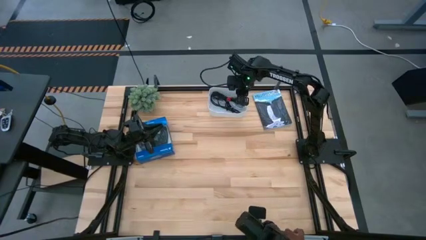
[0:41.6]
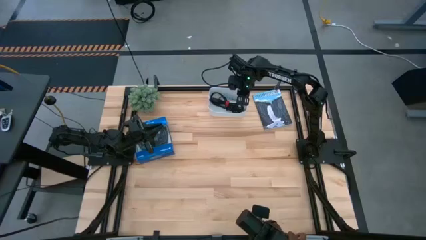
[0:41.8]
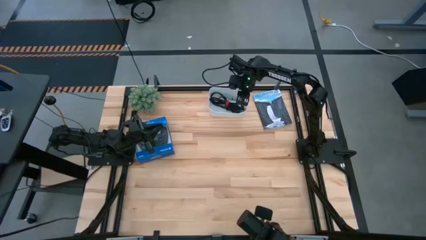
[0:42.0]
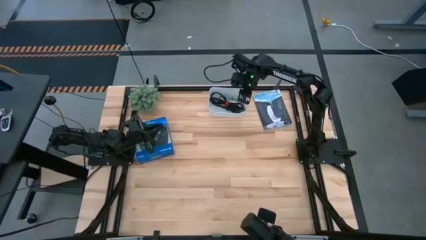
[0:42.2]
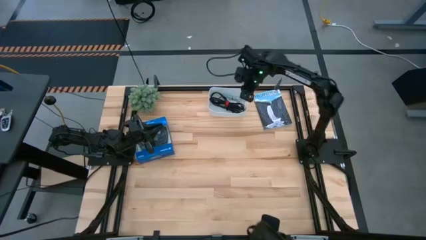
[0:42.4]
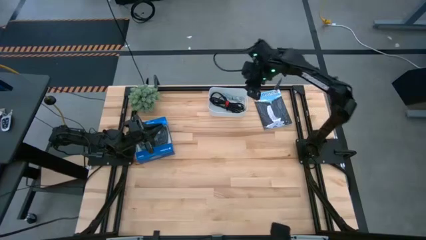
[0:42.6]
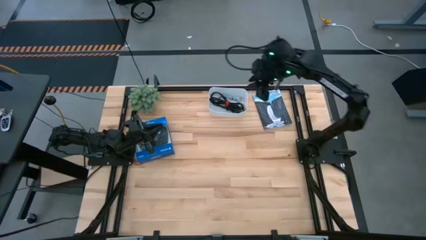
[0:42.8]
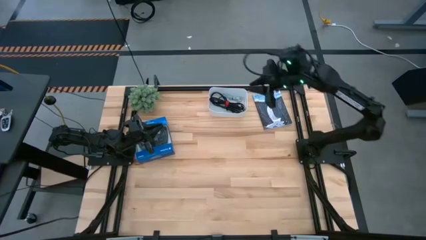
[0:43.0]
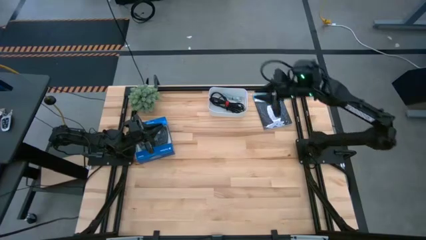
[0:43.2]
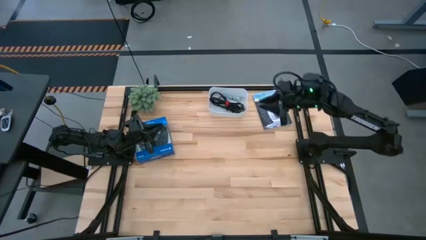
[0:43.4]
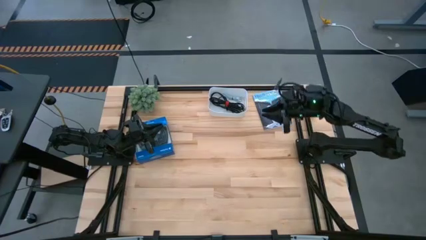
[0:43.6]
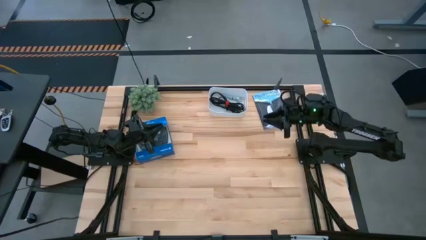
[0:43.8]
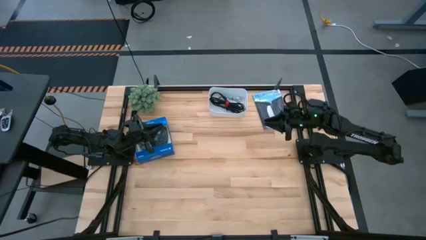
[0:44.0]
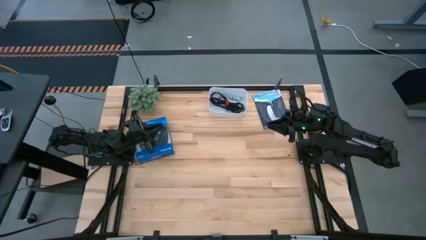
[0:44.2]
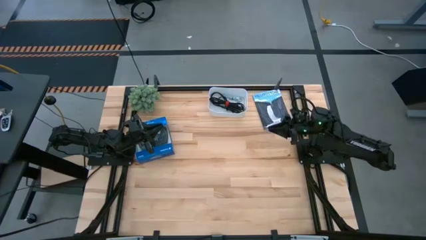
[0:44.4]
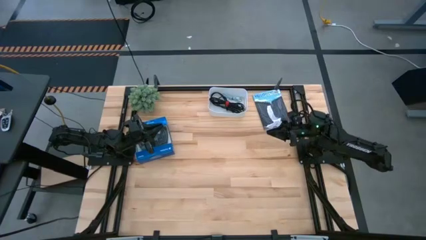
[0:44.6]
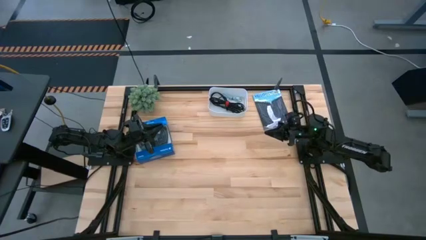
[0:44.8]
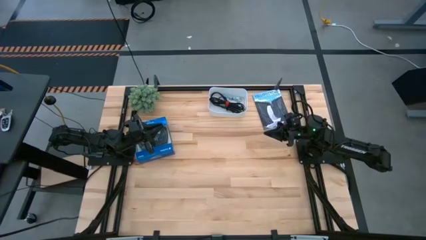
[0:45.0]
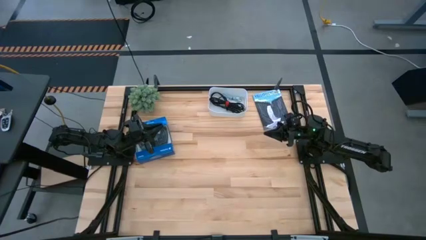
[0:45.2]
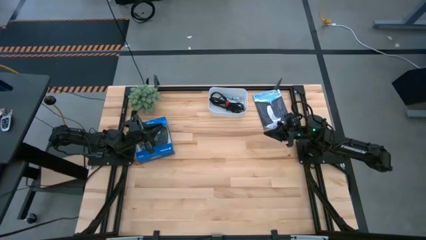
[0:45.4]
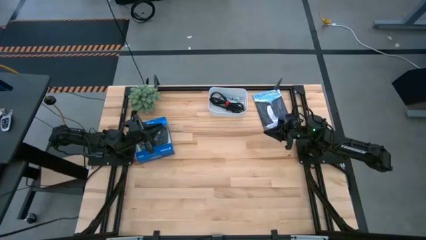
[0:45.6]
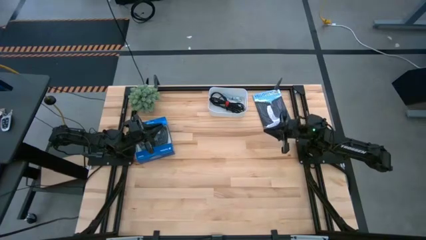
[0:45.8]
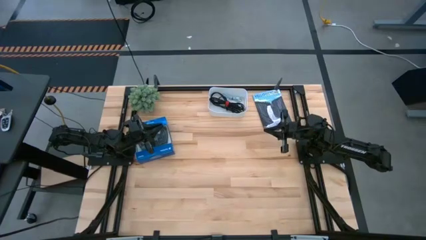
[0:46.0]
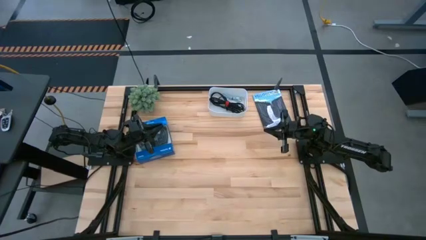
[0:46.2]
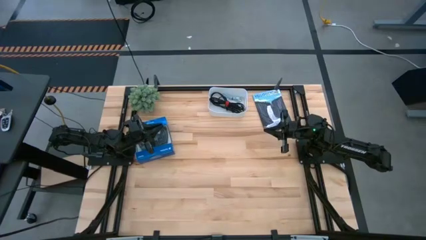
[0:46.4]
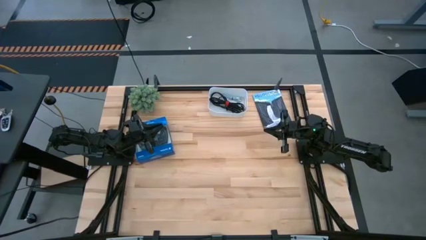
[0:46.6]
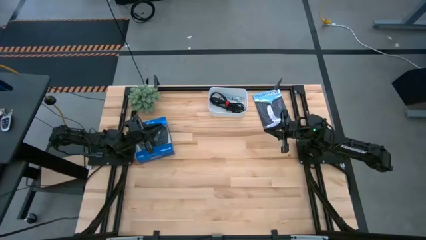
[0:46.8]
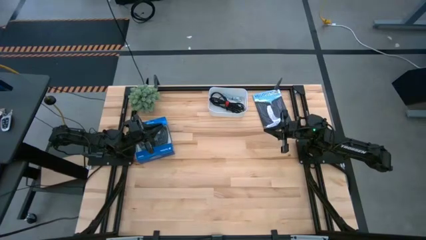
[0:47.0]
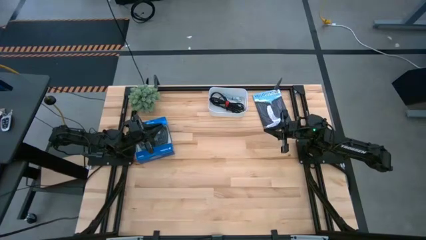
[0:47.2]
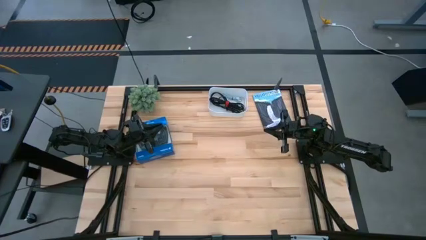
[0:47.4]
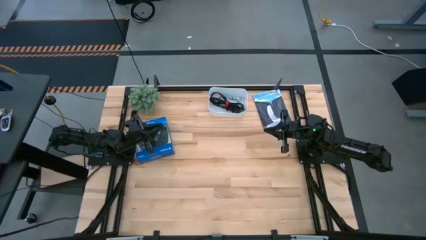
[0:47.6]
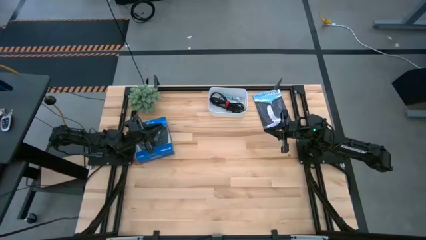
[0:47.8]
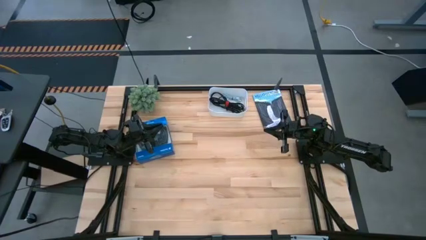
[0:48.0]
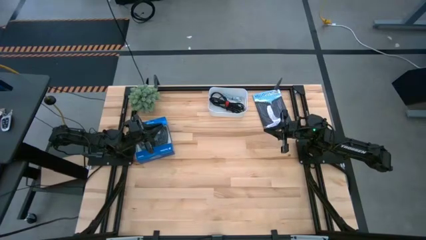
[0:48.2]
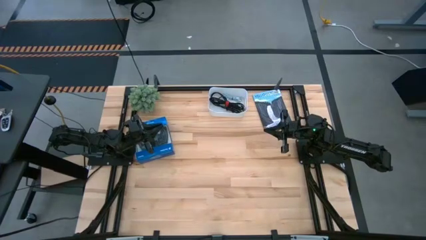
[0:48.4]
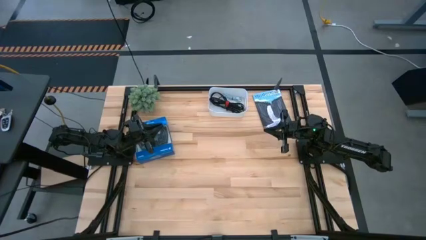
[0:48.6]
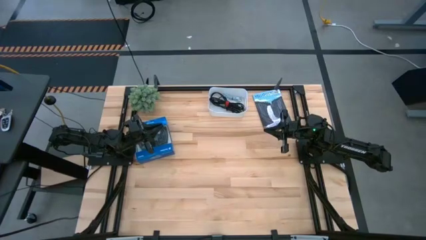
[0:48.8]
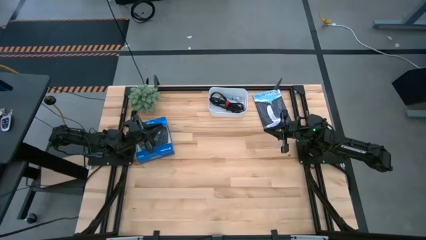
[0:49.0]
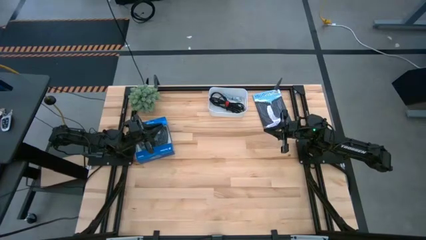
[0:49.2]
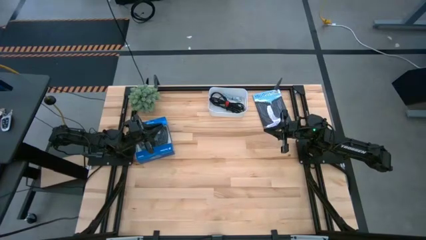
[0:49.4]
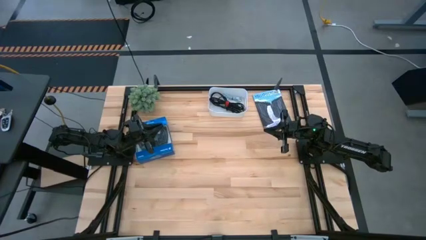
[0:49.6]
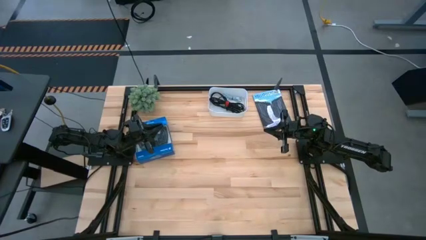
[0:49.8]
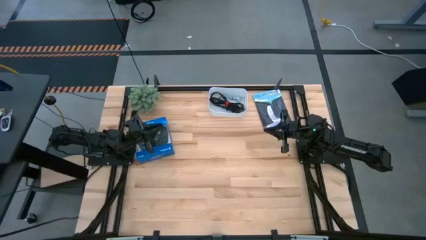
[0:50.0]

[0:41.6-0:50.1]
Task: Pick and place USB-C Cables
Return to Home Position

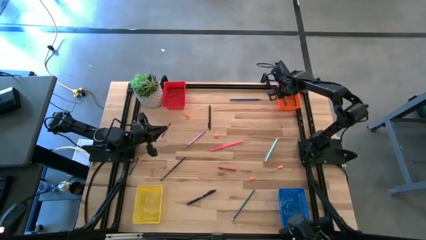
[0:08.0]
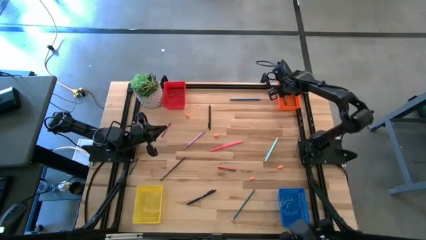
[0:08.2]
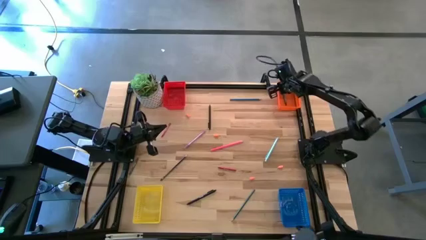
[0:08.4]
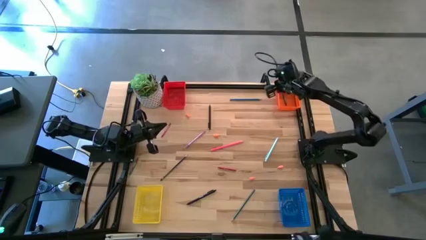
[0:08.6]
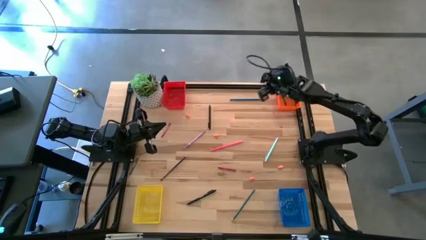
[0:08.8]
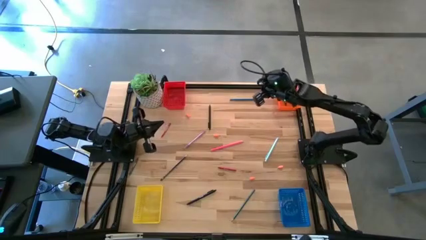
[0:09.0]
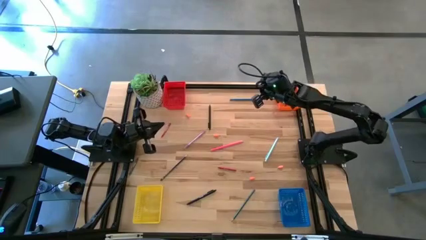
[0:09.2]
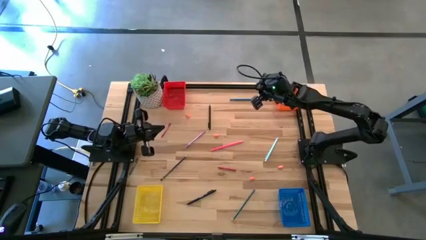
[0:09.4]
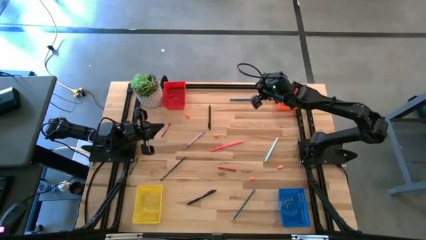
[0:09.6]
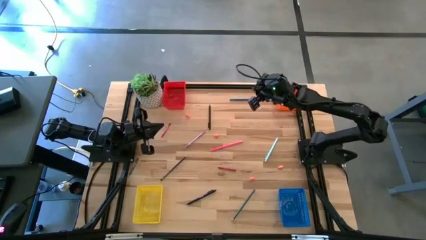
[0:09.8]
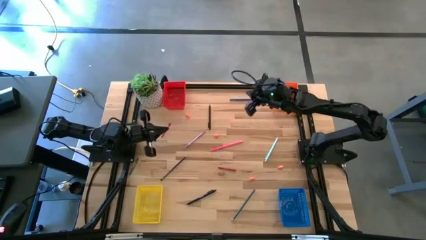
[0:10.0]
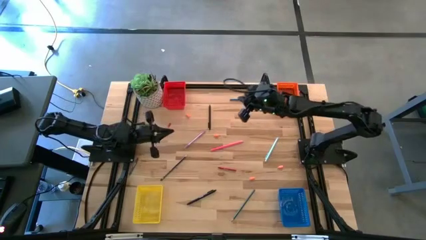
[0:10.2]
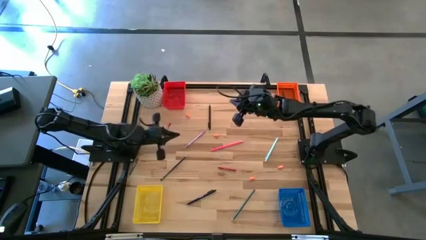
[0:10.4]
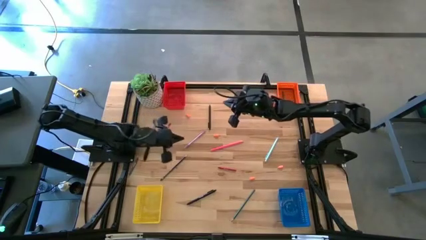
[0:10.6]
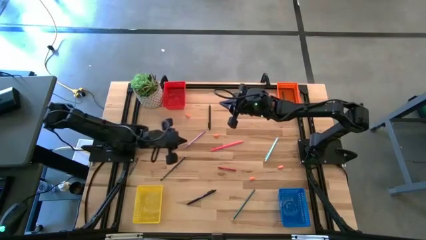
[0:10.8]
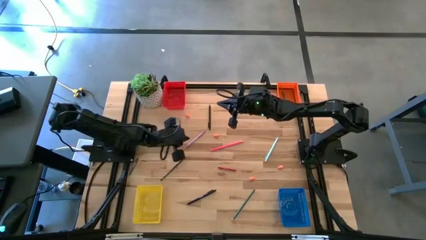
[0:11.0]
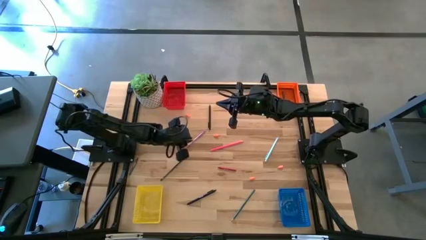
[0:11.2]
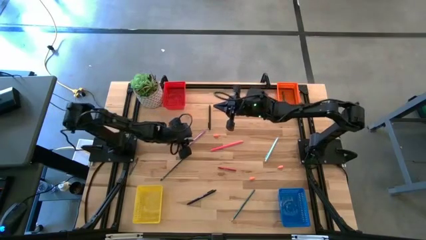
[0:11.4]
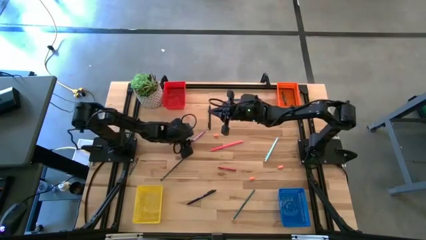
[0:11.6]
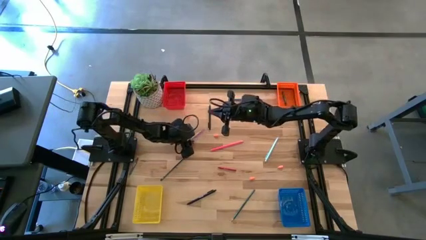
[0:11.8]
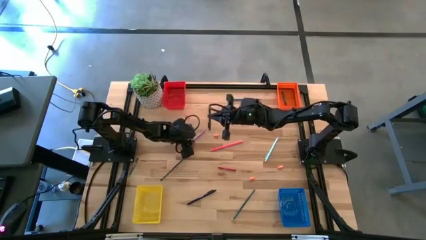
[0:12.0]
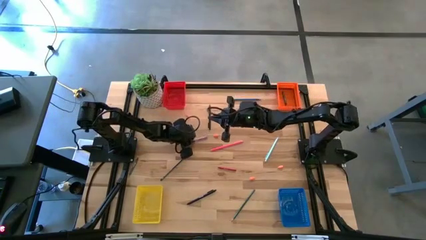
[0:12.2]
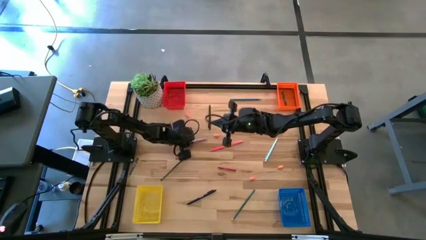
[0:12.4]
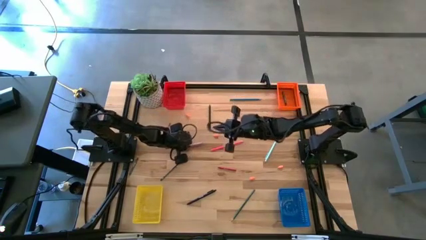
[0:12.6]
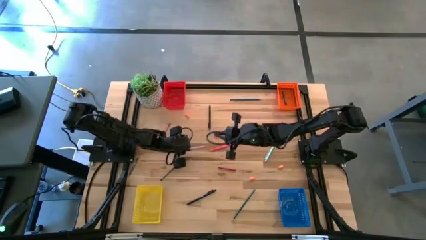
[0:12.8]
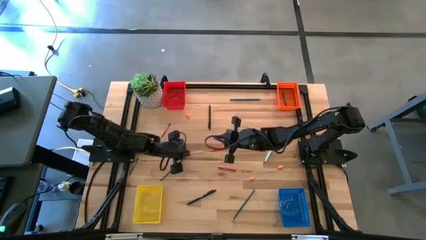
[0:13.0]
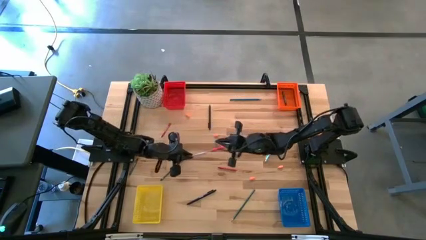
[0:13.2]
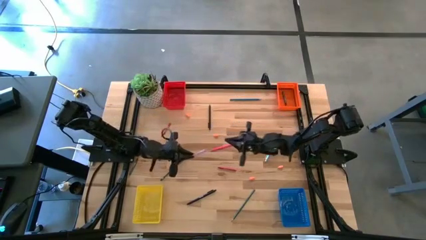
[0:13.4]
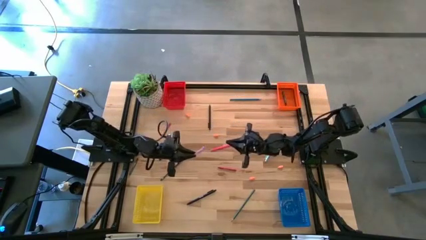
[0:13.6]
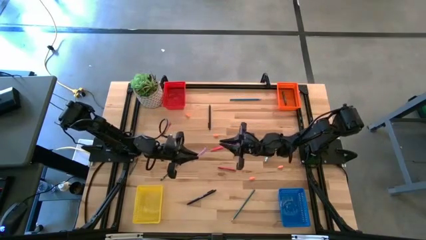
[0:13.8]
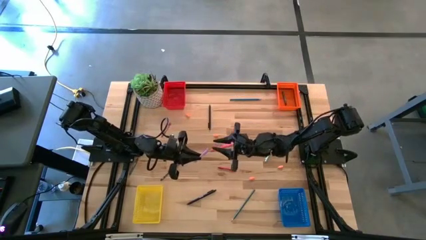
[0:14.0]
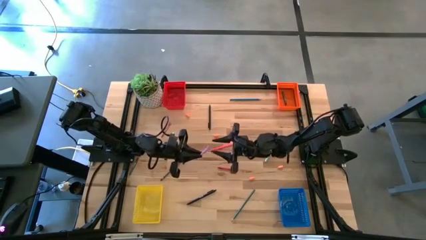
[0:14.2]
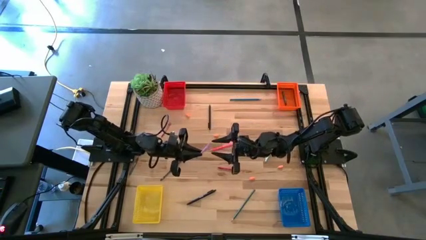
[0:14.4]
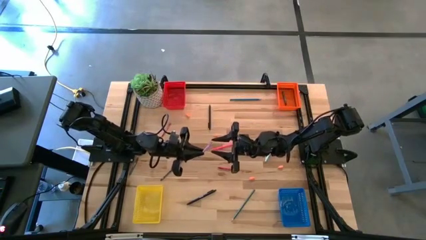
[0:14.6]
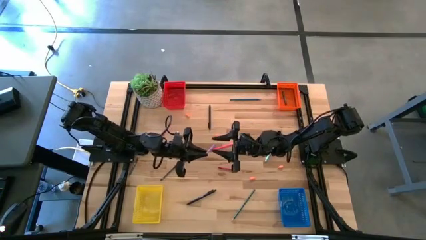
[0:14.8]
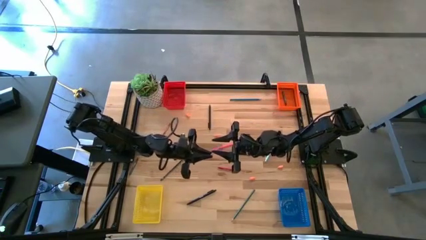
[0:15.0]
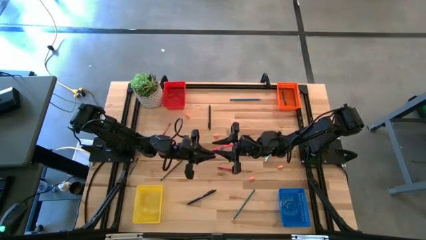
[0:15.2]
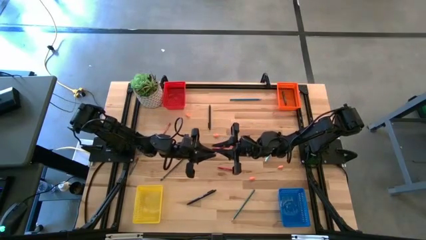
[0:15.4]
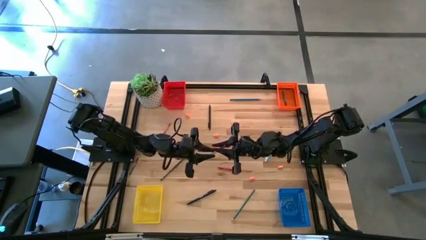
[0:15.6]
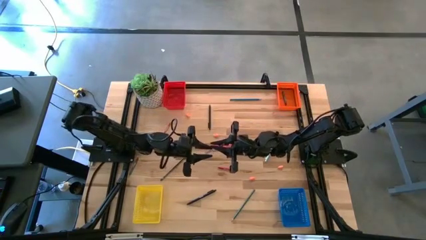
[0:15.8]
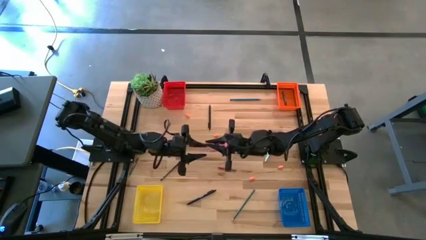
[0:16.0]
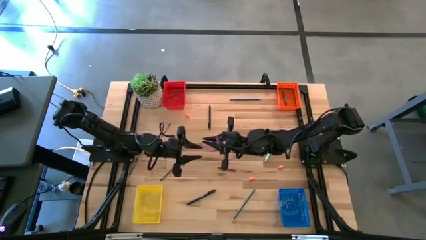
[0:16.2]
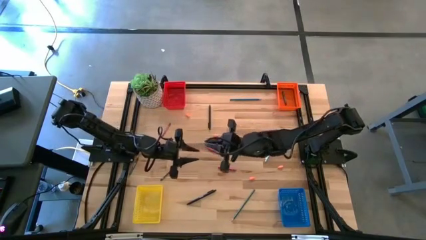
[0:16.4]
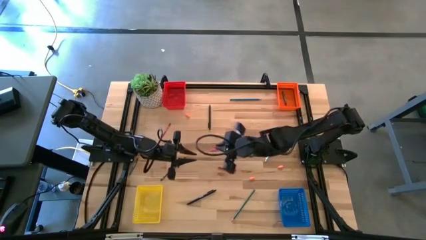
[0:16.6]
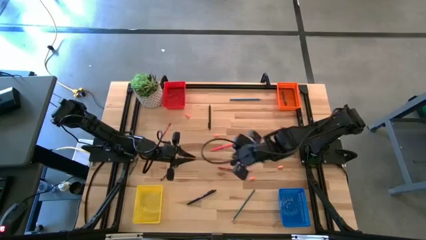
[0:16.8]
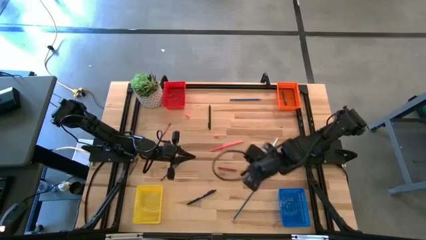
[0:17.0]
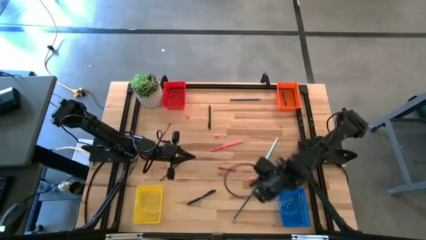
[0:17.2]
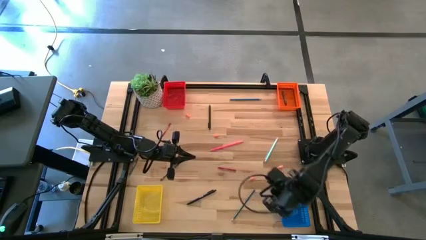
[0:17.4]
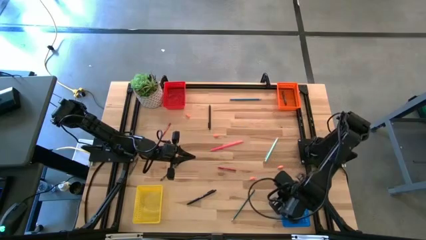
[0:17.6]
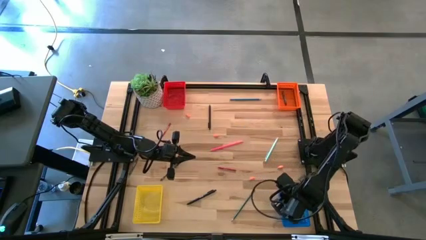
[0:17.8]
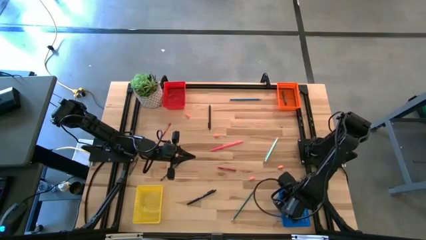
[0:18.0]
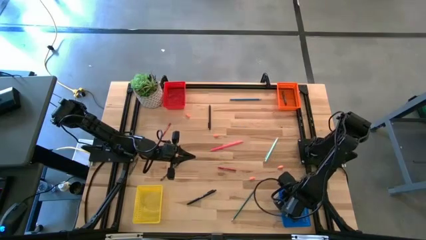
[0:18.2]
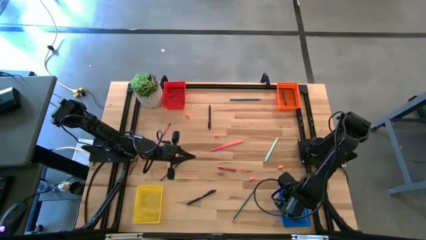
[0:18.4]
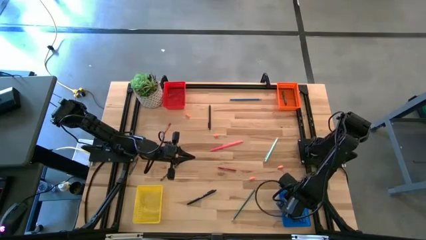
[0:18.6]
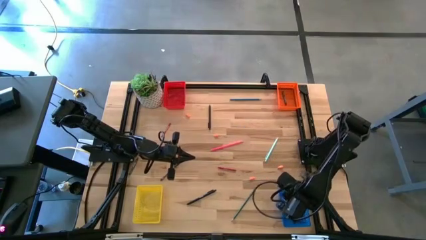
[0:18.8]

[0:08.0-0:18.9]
Task: Sort crayons/erasers/pens/pencils in bins
Put the purple pen into the blue bin
